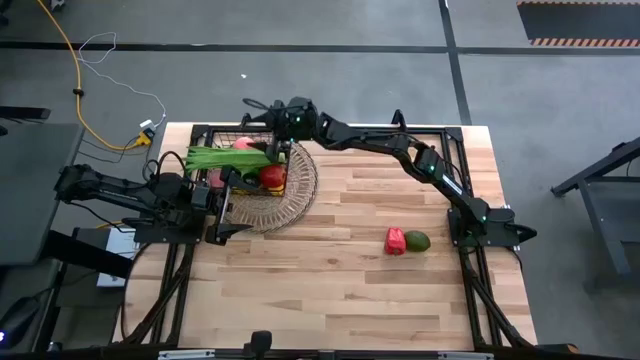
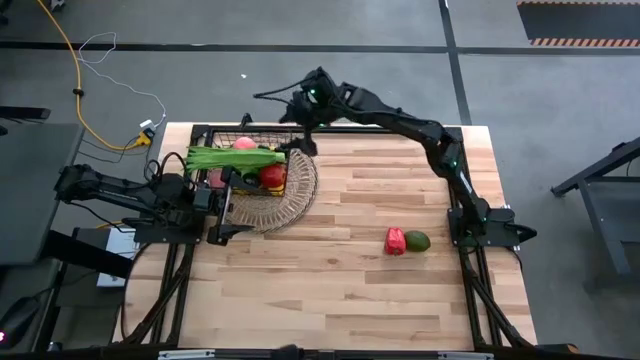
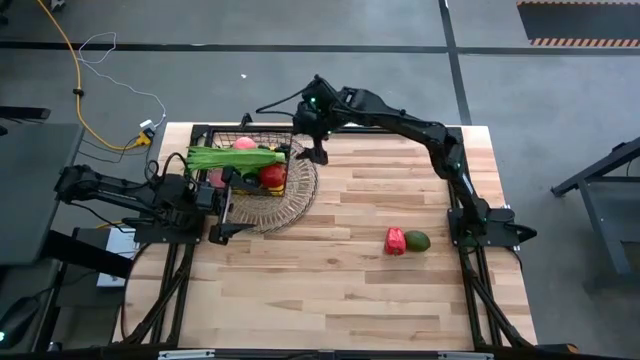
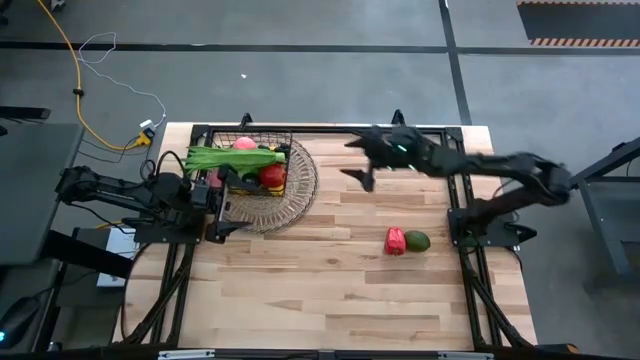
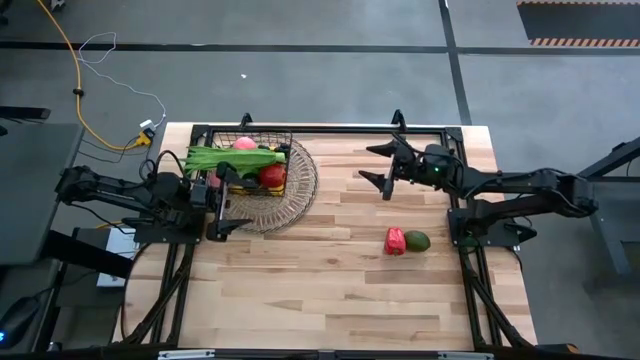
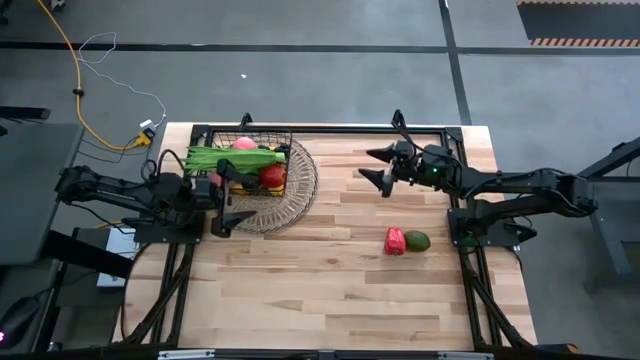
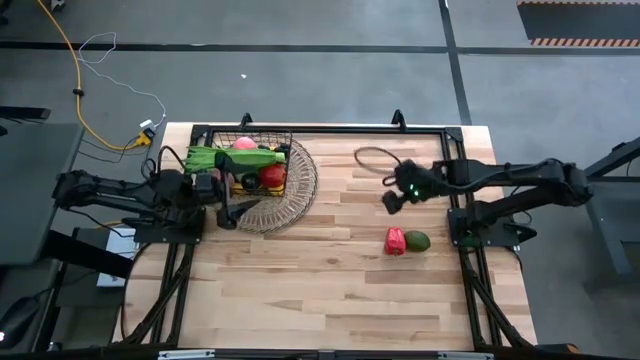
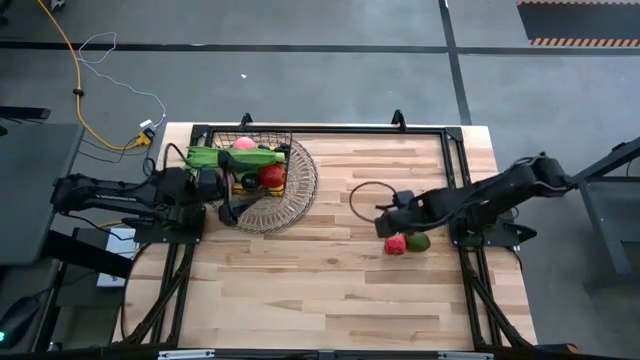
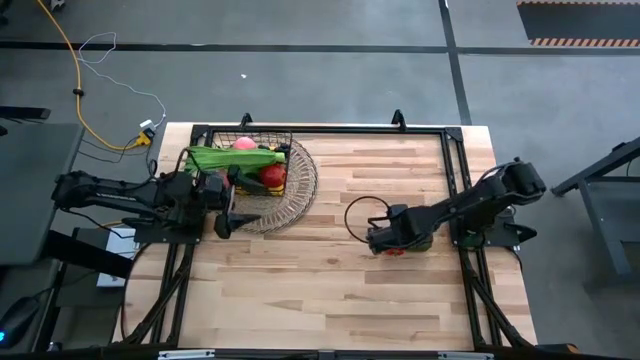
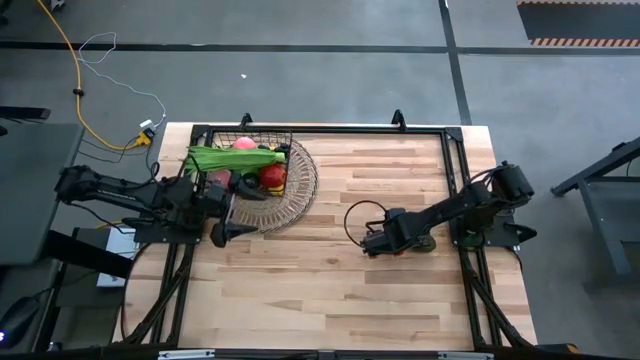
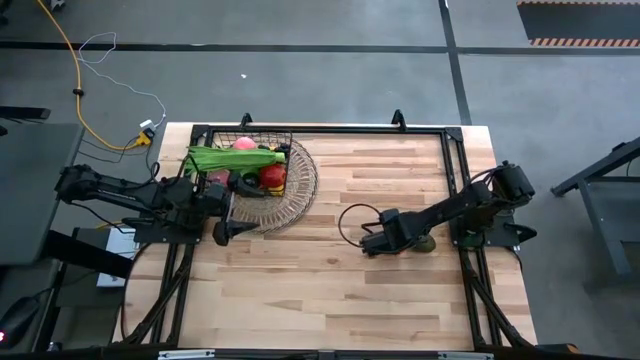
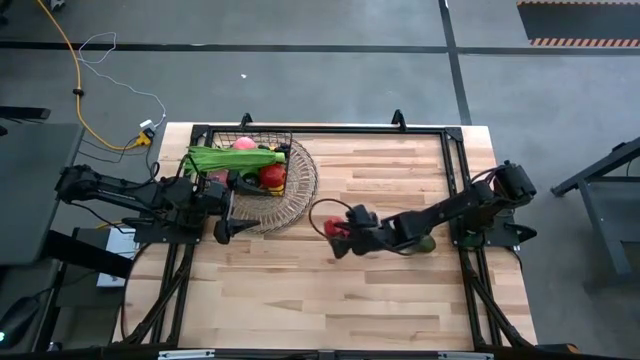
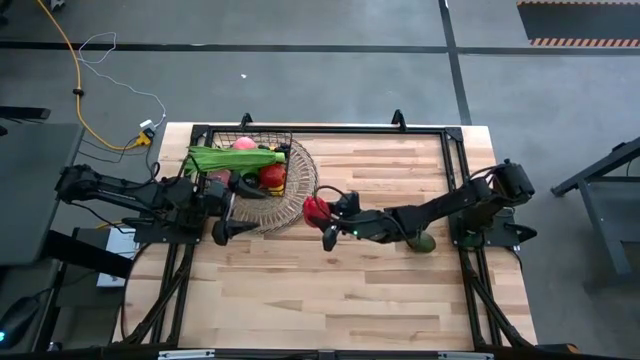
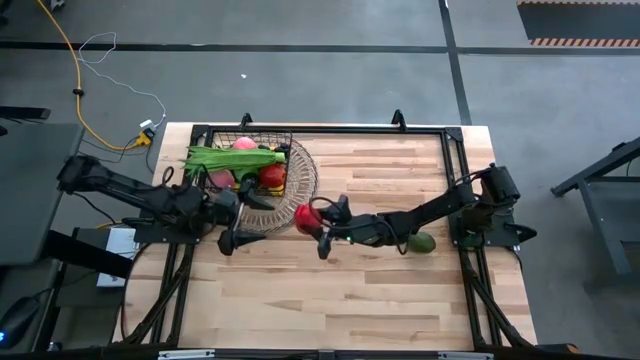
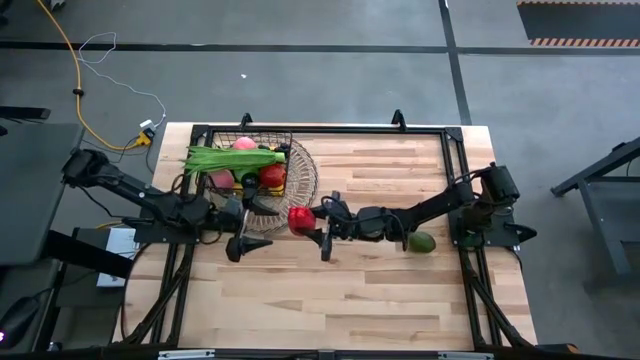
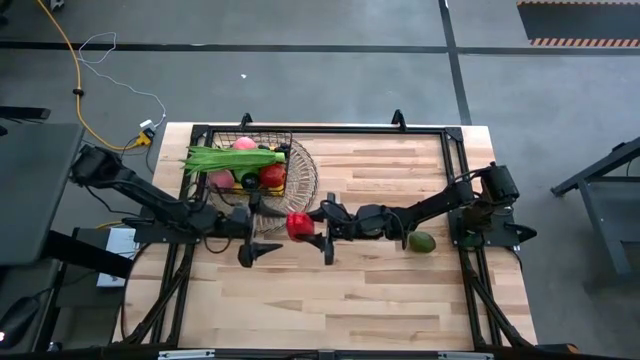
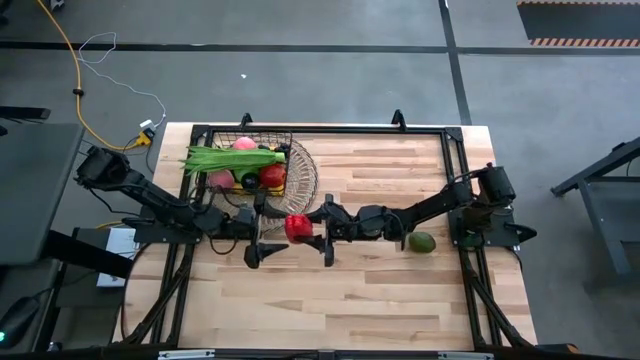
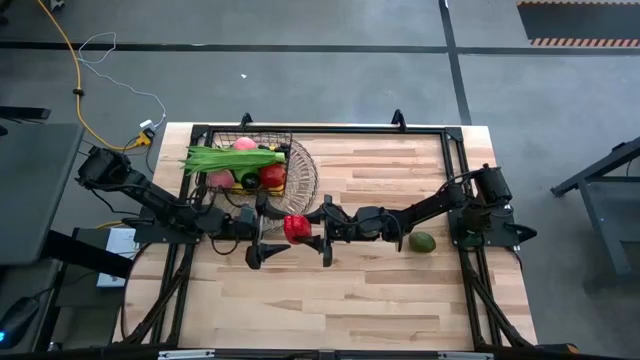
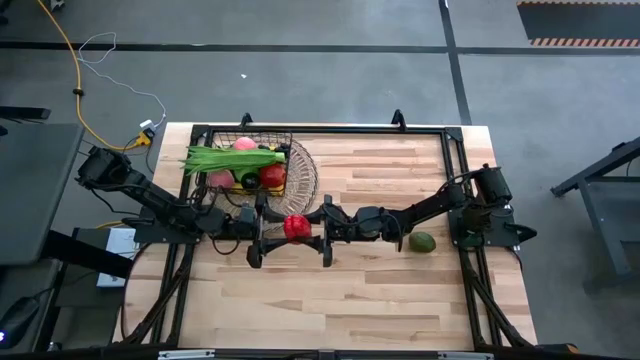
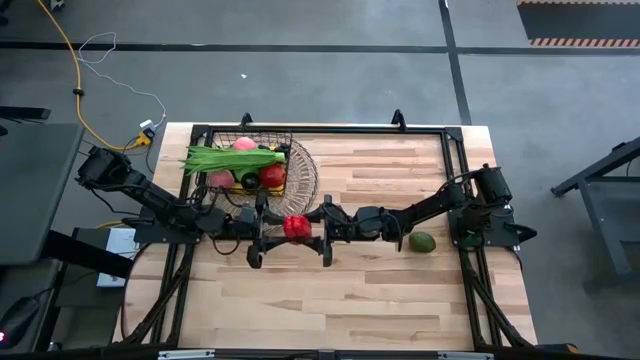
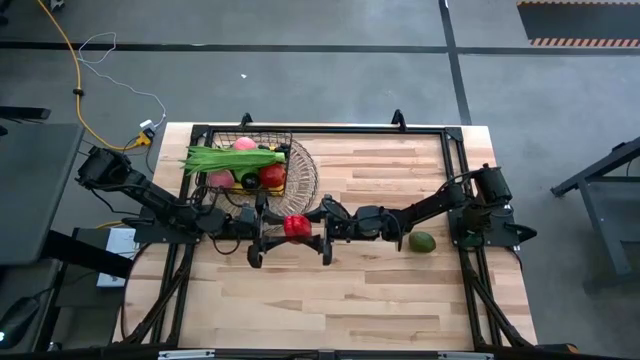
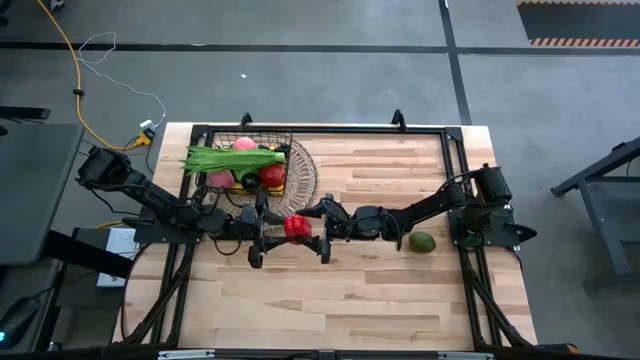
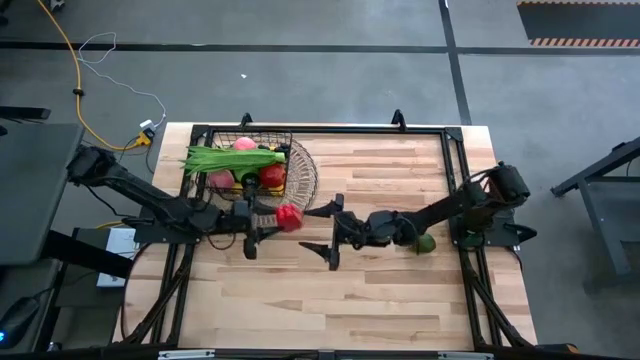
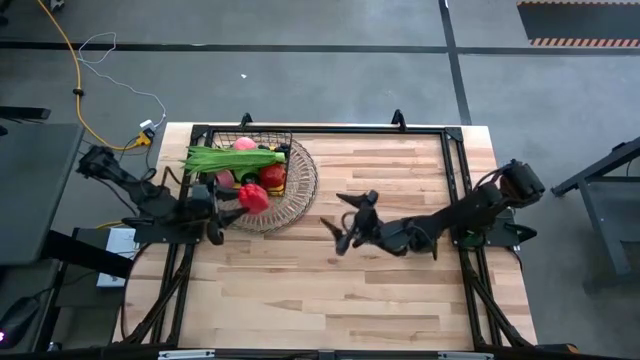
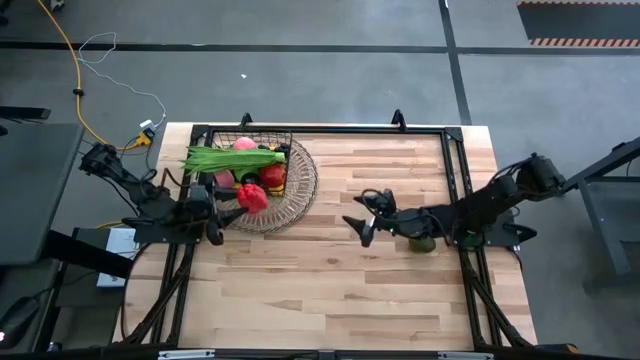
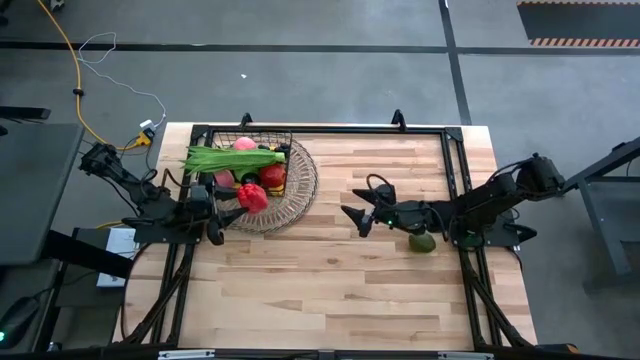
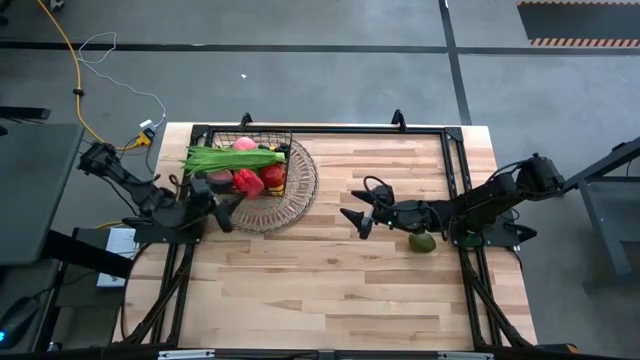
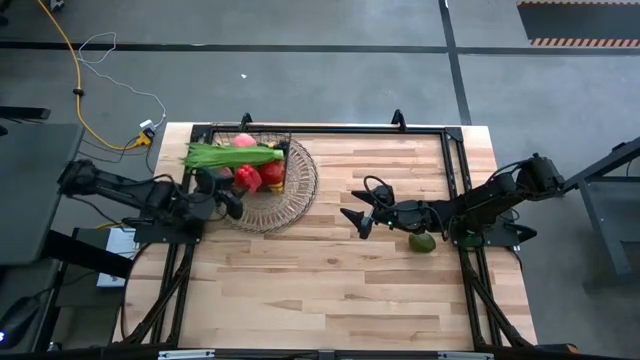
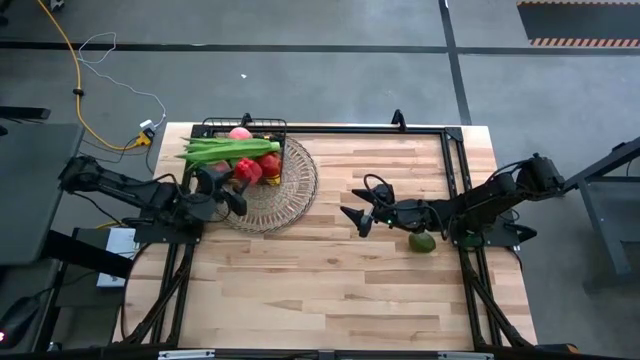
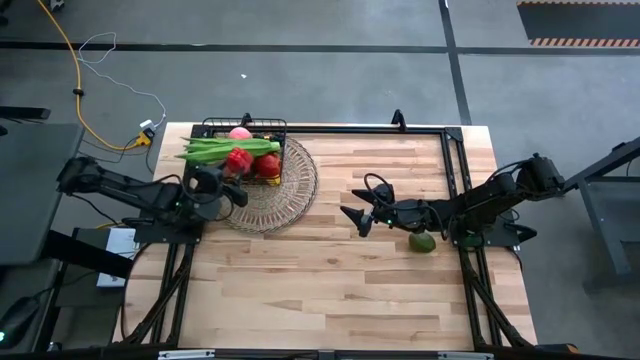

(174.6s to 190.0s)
Task: Build produce basket
Put the red bell pepper into the black wire basket

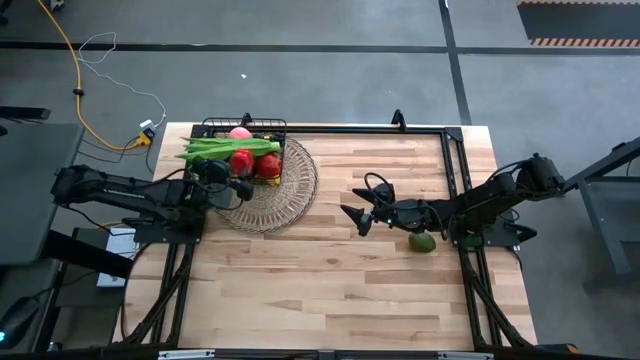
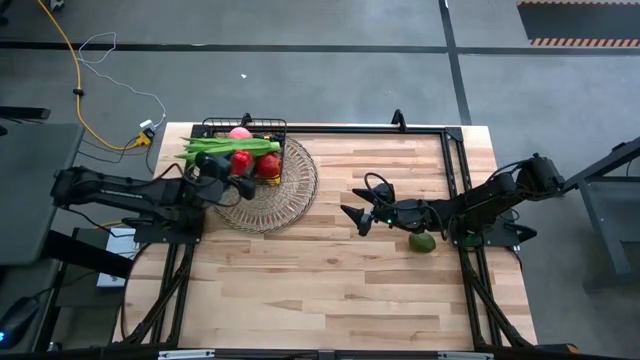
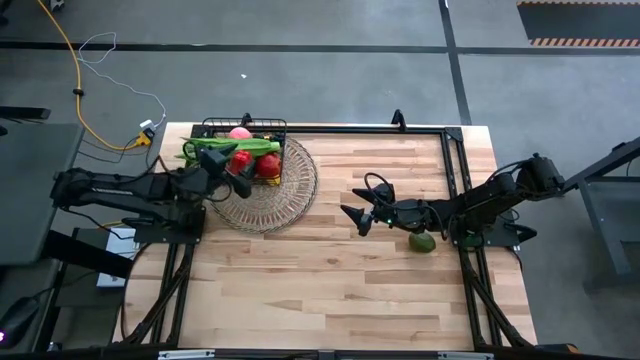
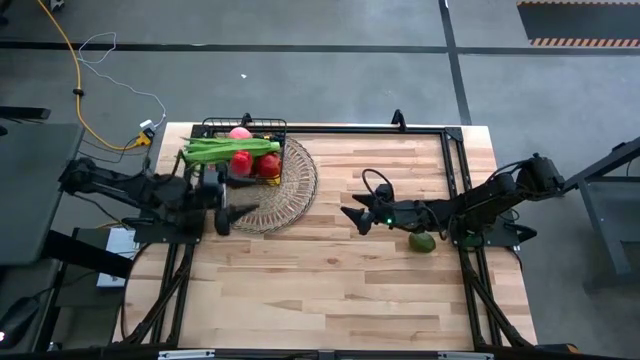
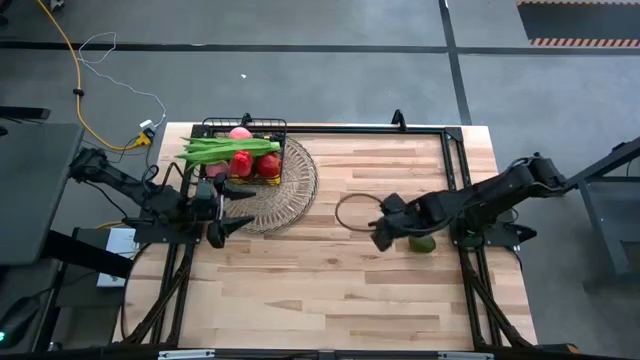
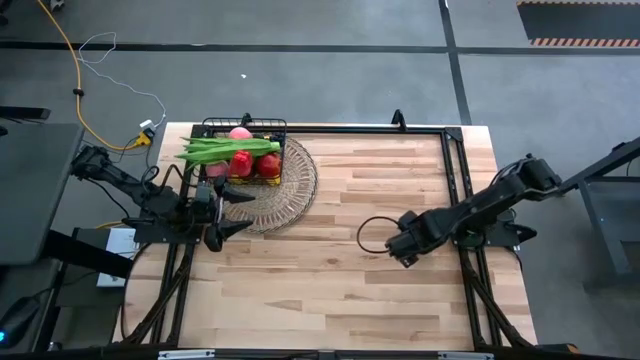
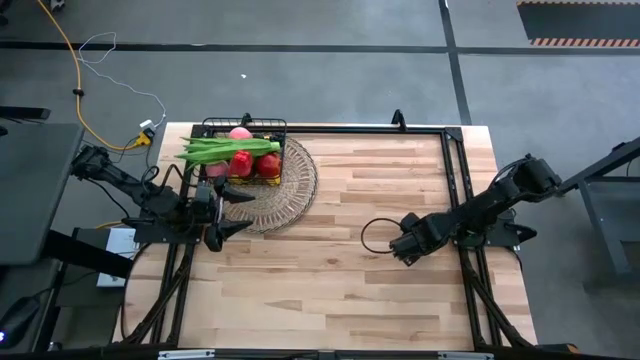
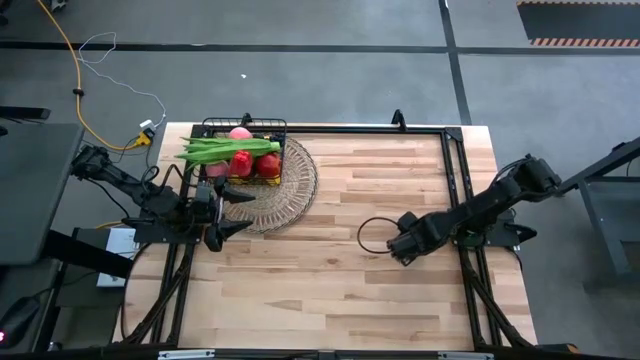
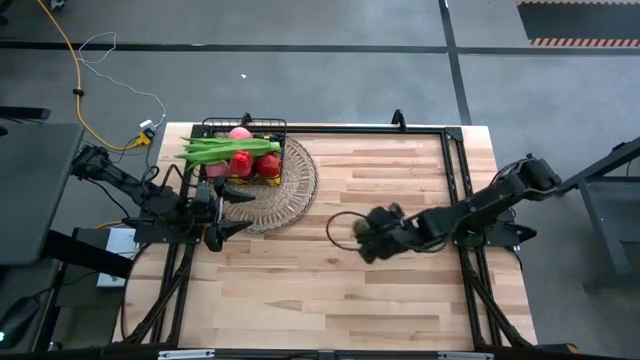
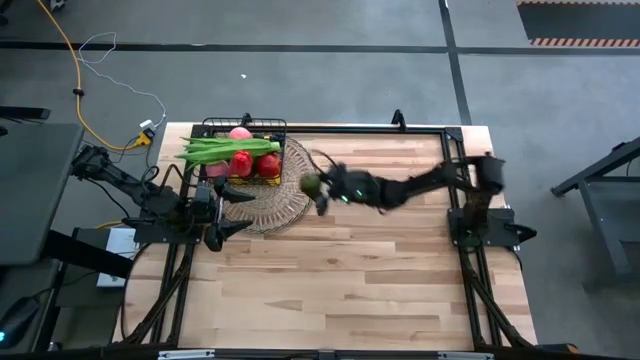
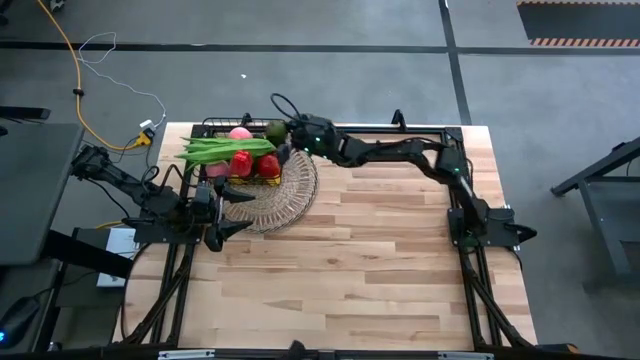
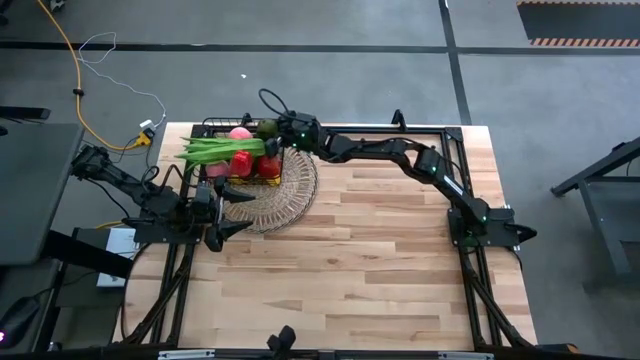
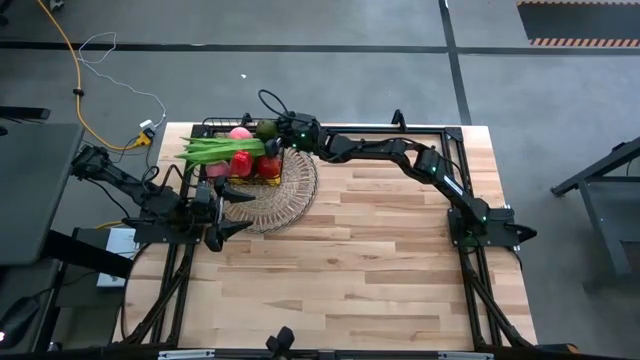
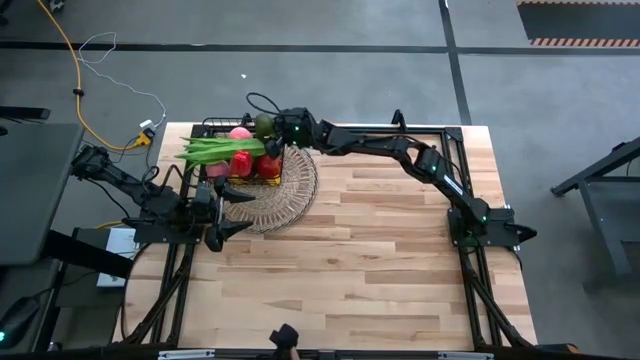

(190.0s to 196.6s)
Put the green lime into the black wire basket
